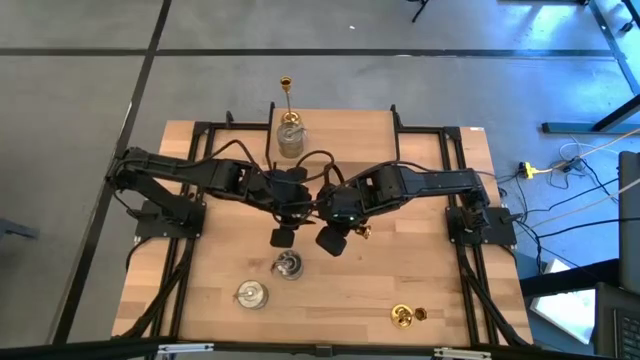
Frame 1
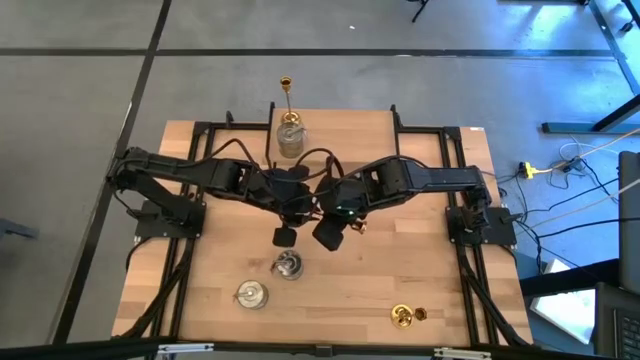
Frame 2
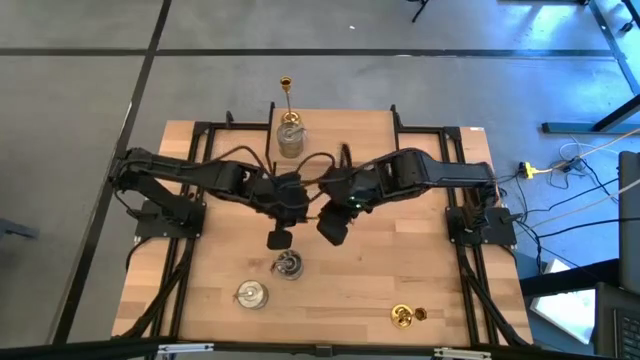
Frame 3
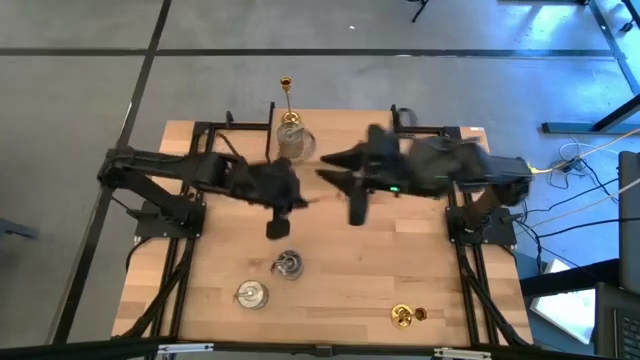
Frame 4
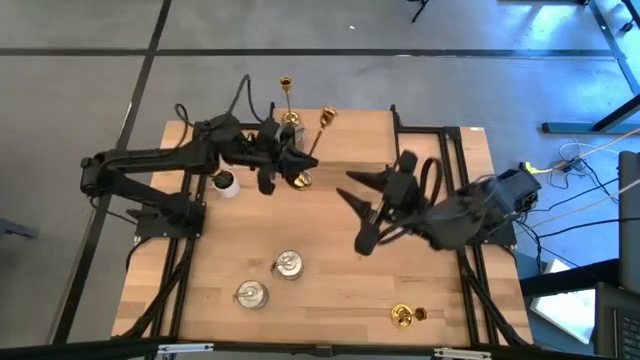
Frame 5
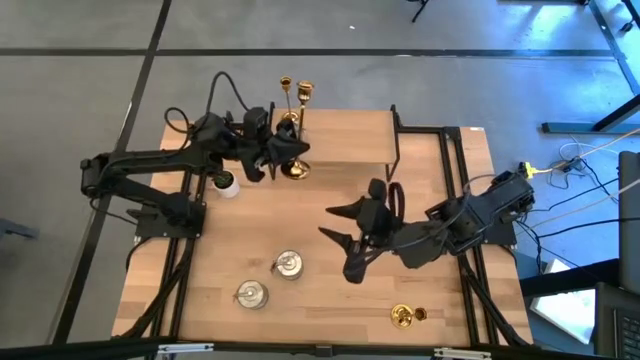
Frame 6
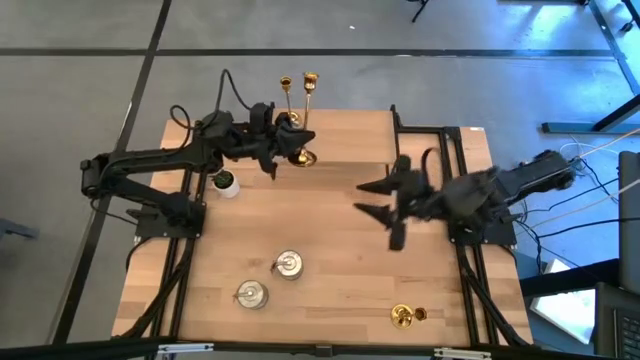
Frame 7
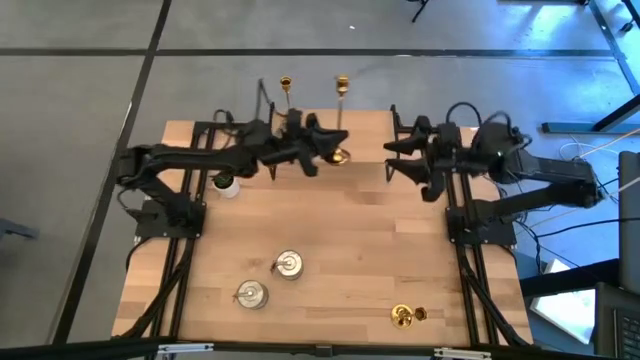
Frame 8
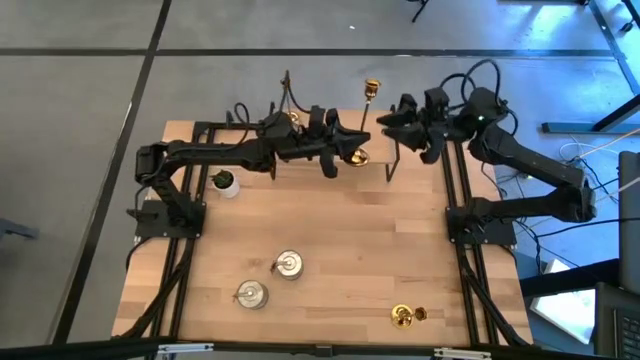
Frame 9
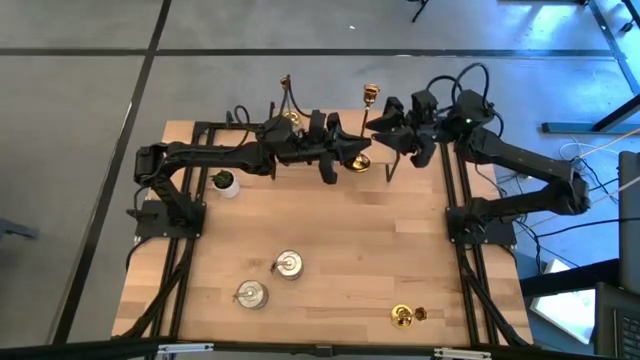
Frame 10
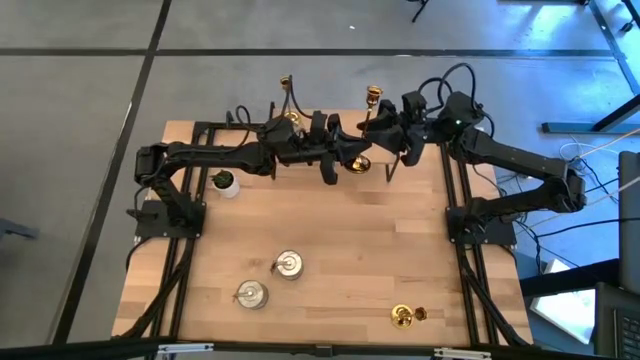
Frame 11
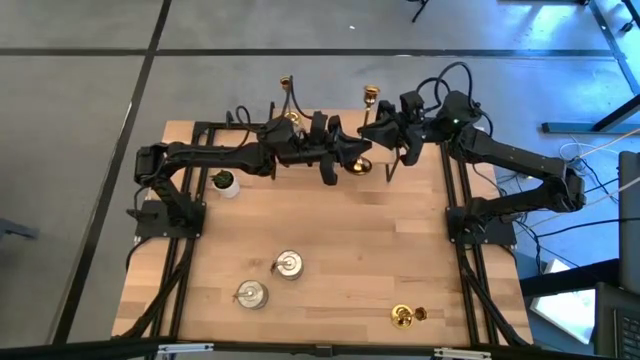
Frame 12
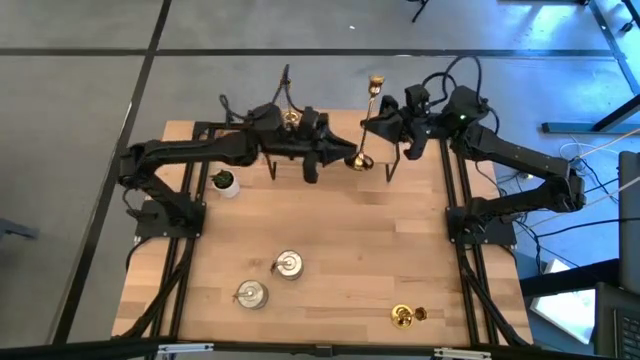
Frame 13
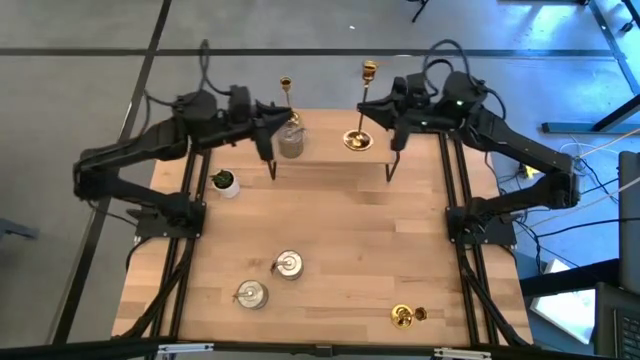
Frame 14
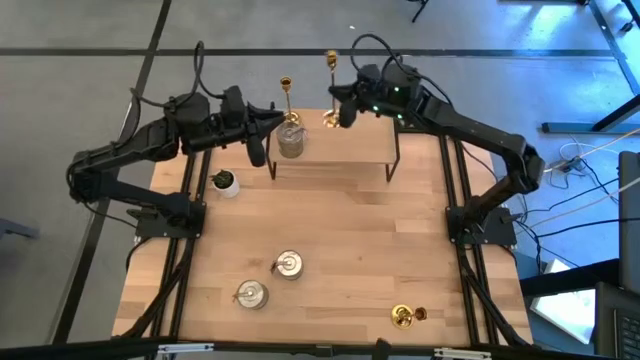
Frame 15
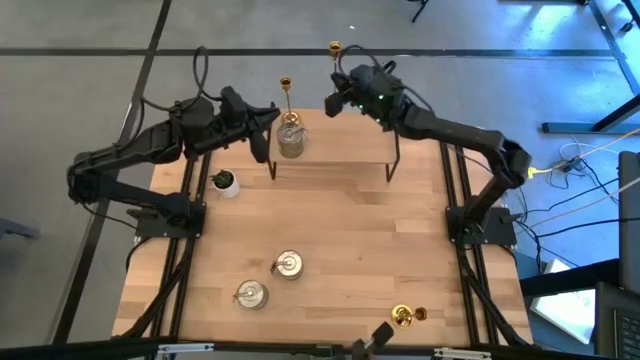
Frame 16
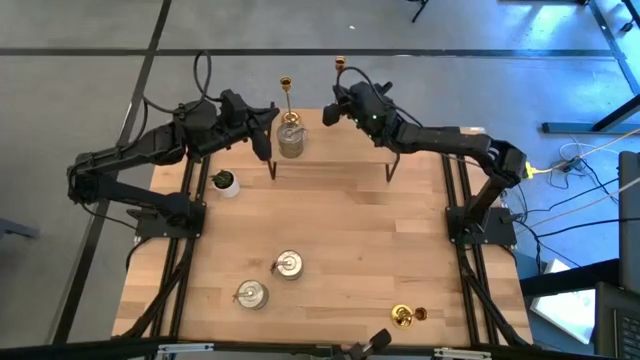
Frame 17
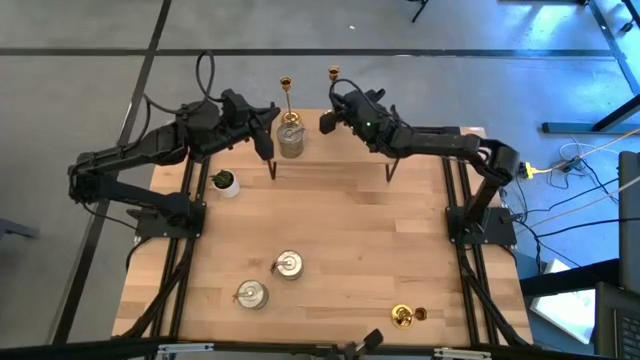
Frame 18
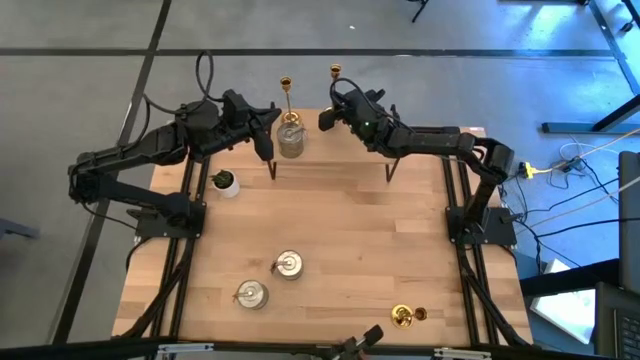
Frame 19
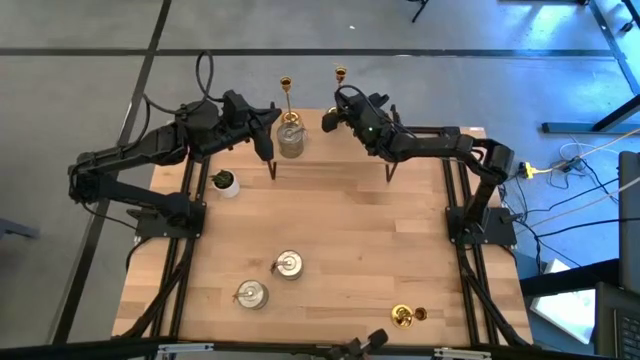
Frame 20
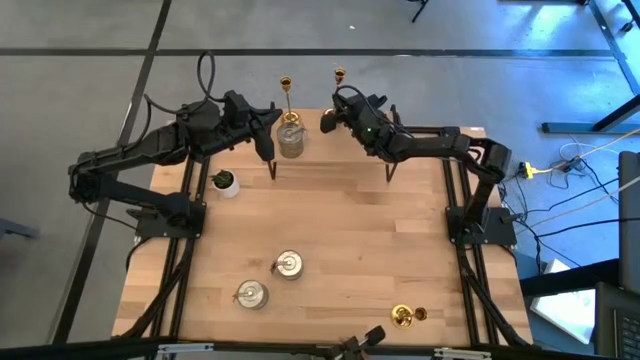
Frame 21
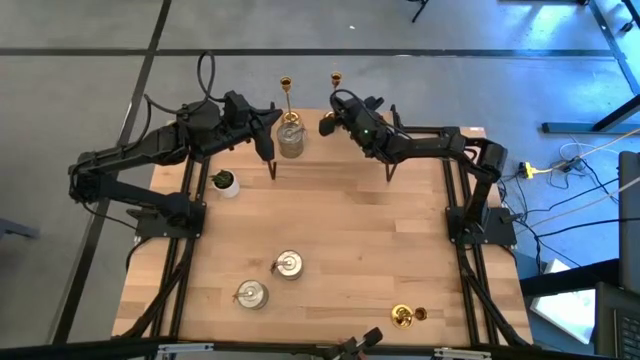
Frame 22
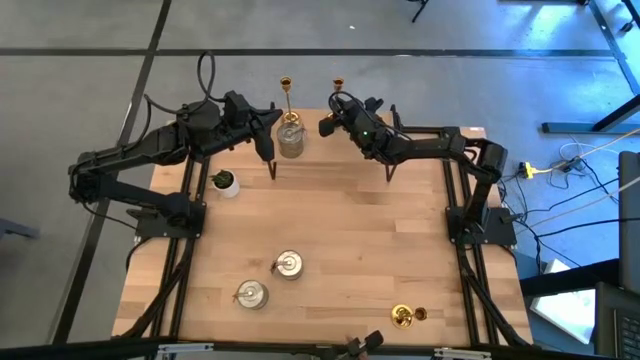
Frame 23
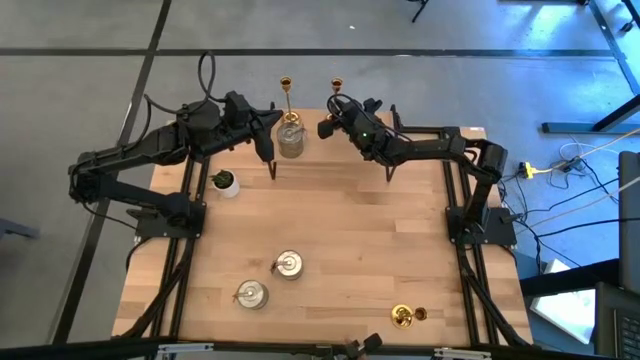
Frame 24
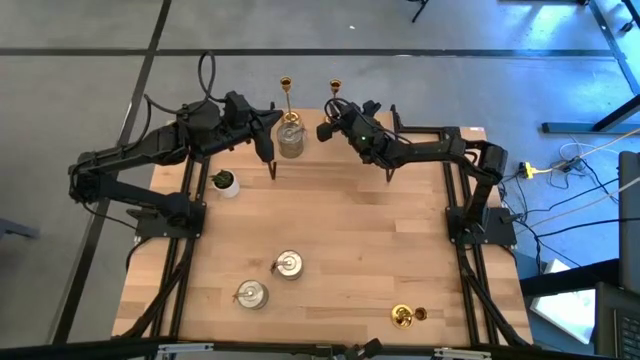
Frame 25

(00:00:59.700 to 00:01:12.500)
Task: Pick & Place candle stick holders
Put the top gold candle holder on the shelf aligned with the other gold candle holder

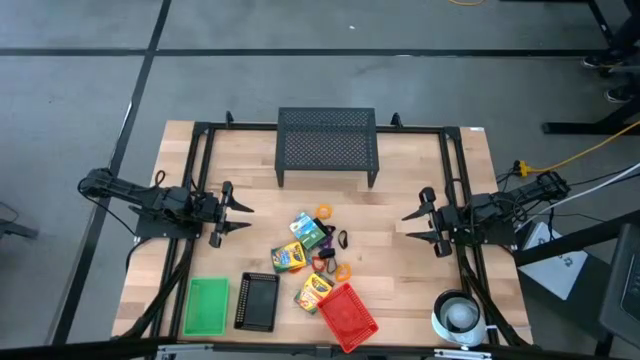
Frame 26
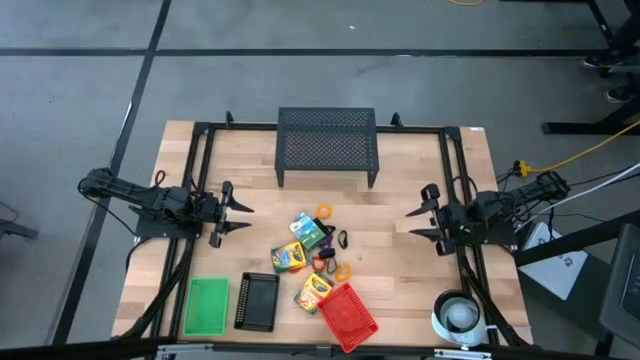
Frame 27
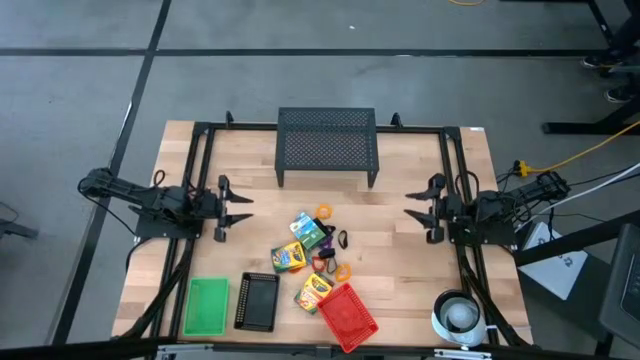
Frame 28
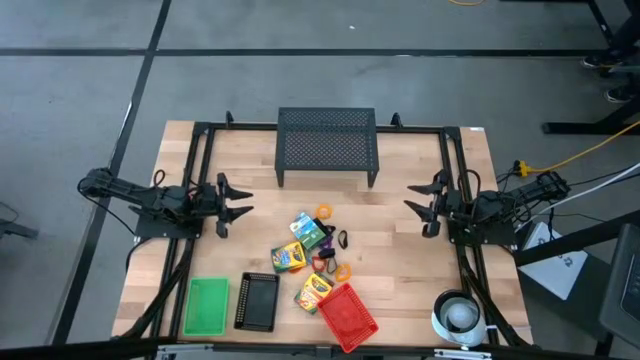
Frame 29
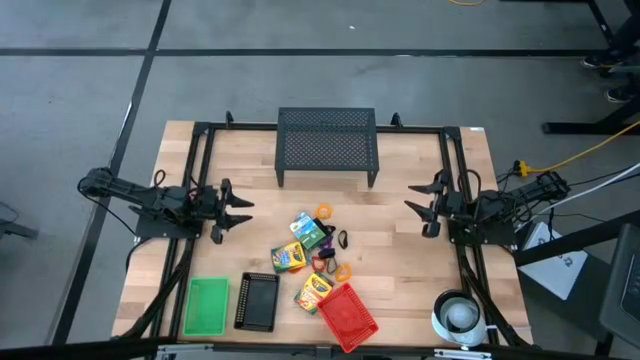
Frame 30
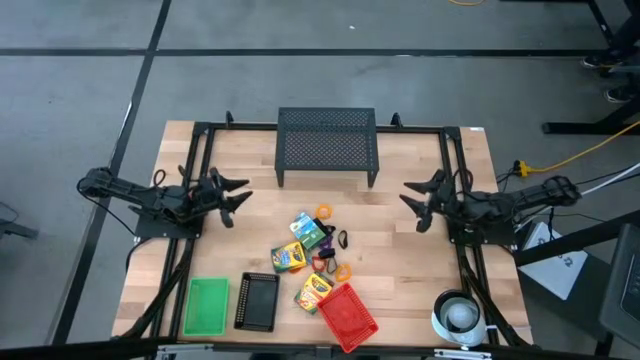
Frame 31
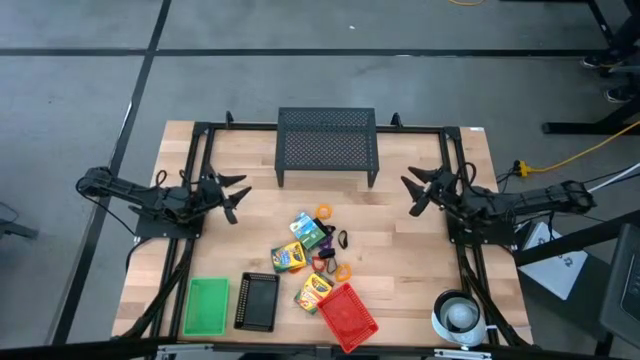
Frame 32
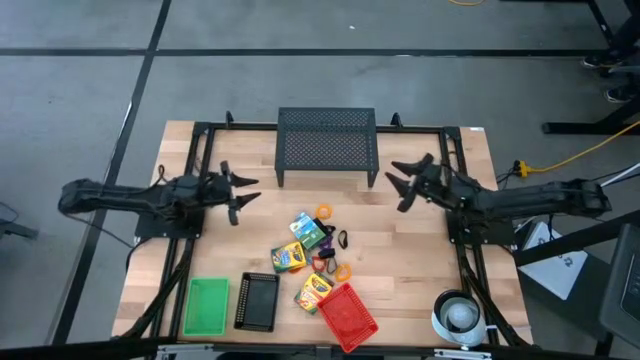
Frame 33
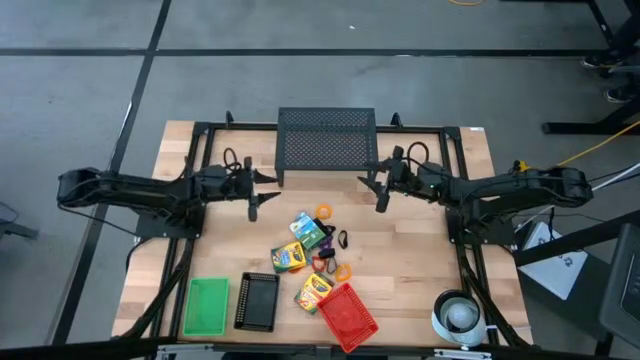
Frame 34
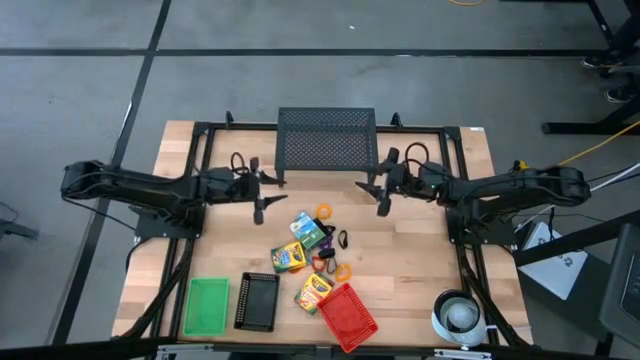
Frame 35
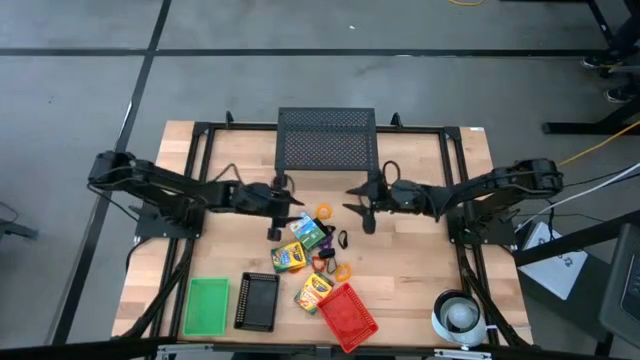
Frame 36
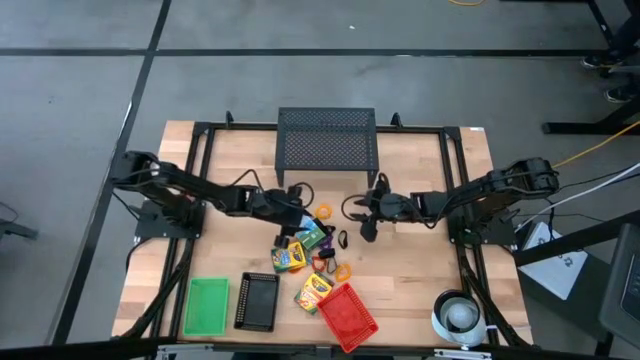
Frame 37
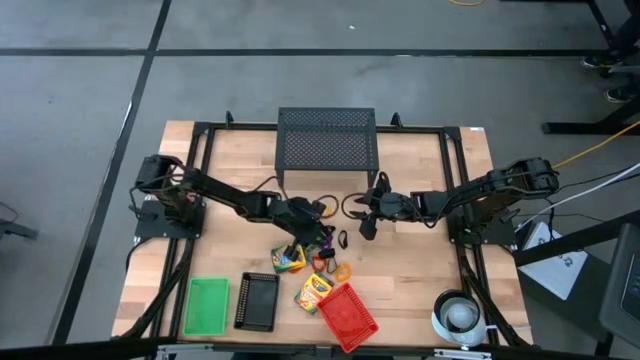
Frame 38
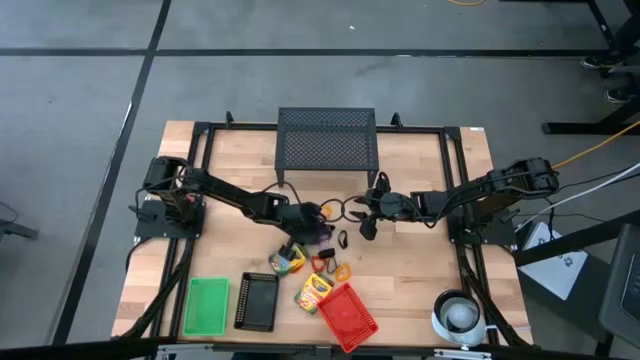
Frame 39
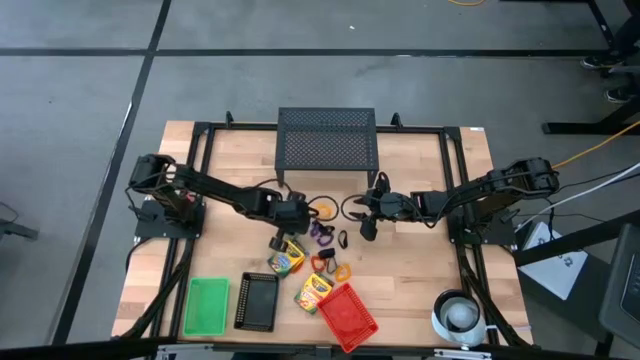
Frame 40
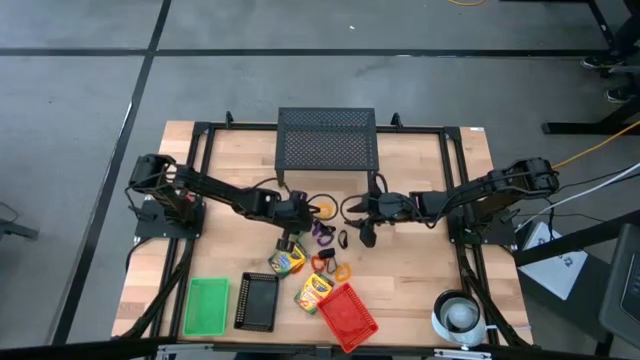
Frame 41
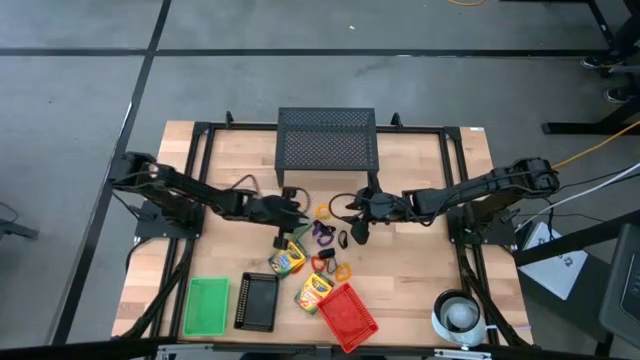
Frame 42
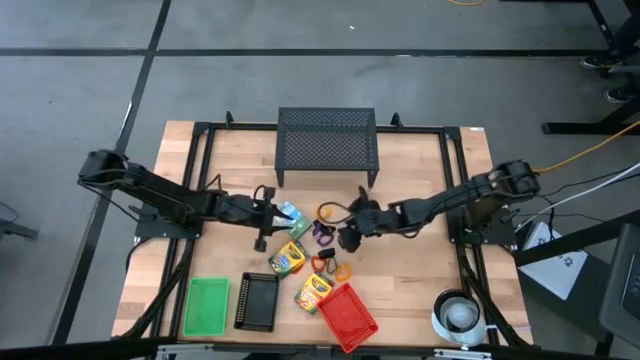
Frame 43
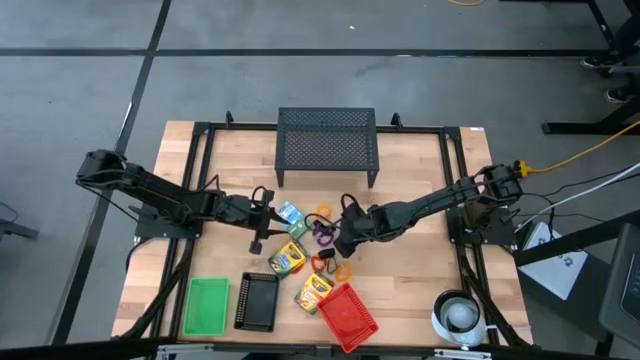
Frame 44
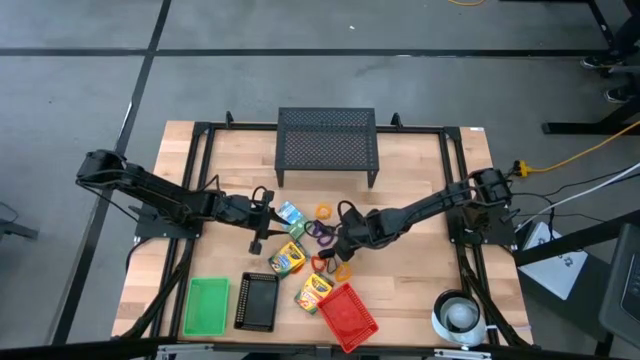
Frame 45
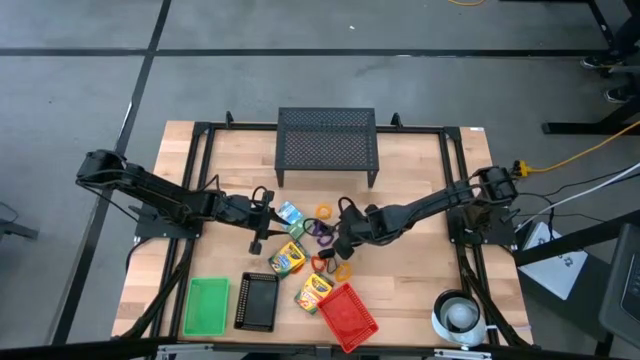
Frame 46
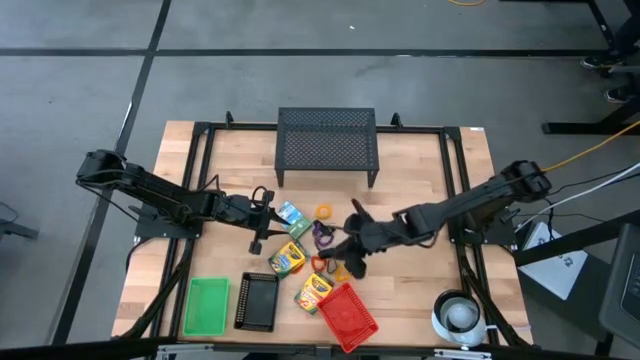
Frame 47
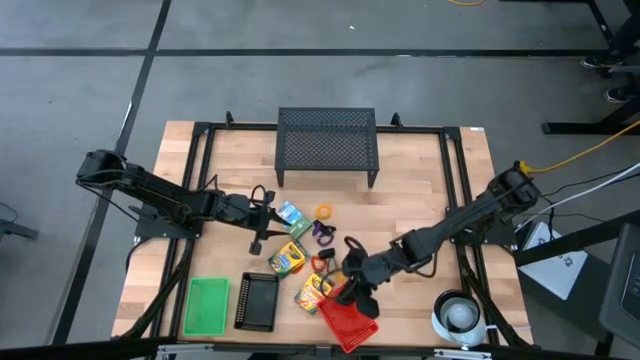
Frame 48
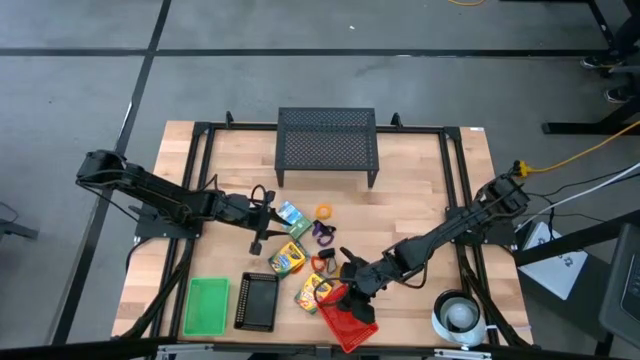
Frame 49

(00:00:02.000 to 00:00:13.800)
Task: Pick & Place Office Desk Supplies
Put the black rubber band into the red bin
